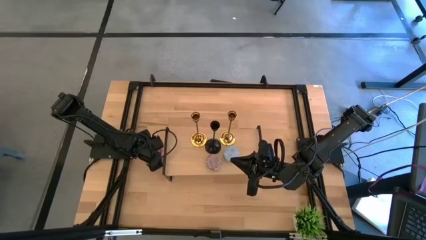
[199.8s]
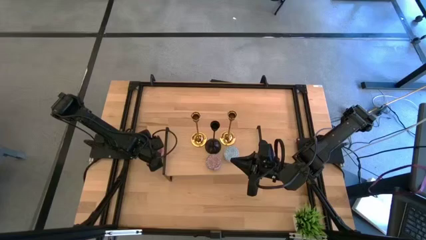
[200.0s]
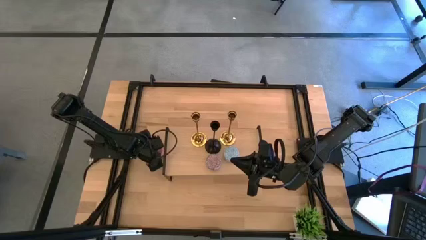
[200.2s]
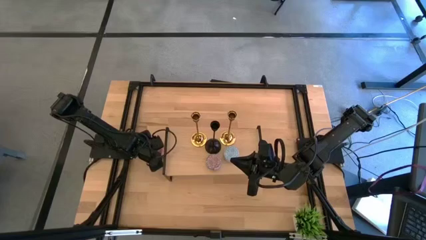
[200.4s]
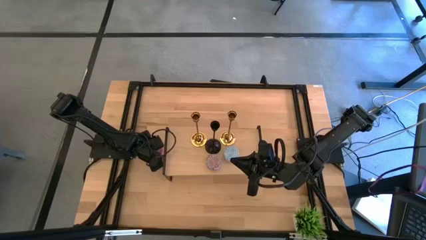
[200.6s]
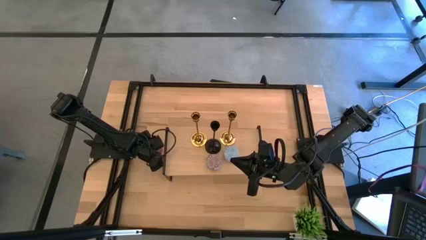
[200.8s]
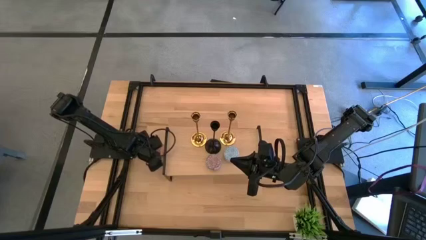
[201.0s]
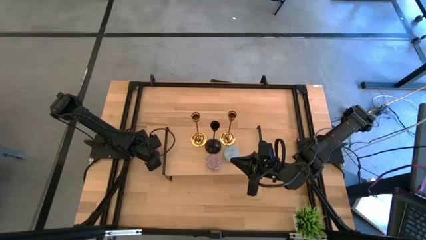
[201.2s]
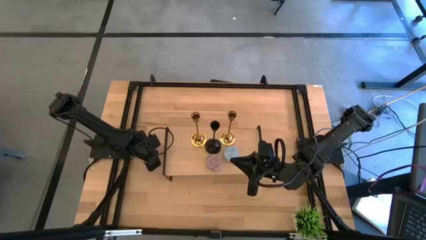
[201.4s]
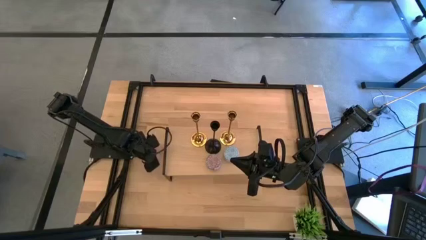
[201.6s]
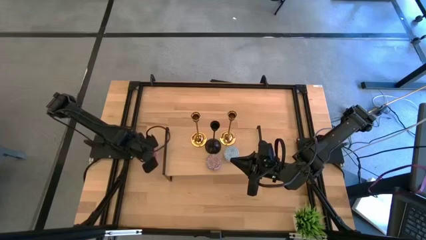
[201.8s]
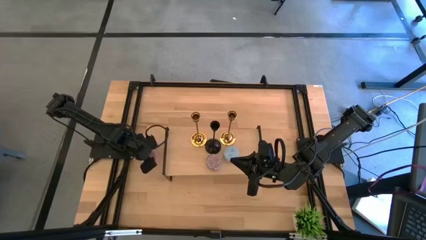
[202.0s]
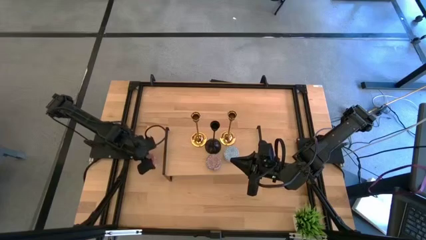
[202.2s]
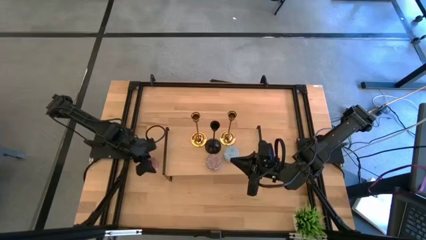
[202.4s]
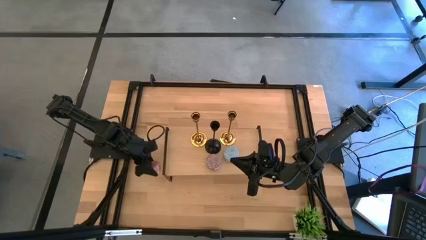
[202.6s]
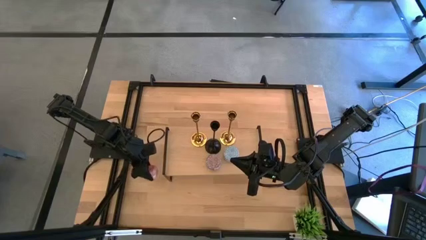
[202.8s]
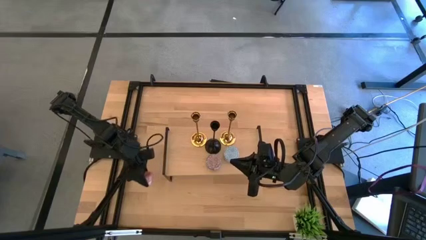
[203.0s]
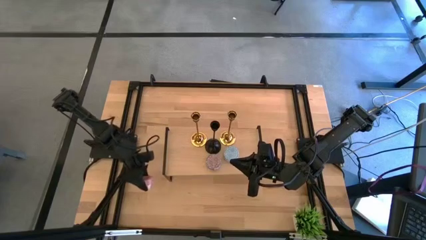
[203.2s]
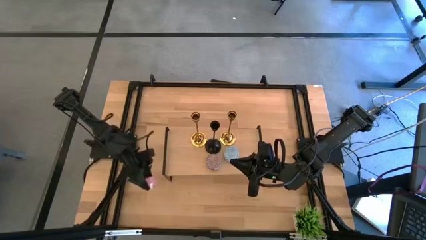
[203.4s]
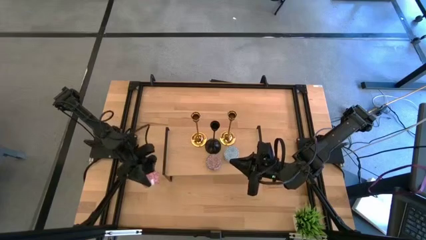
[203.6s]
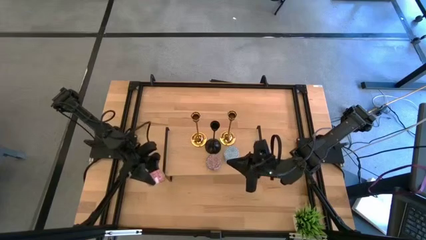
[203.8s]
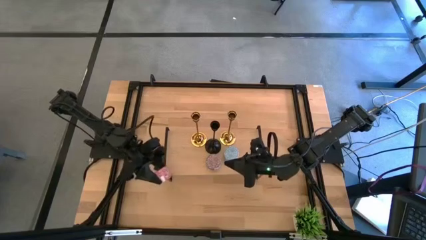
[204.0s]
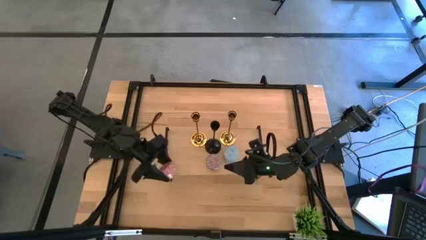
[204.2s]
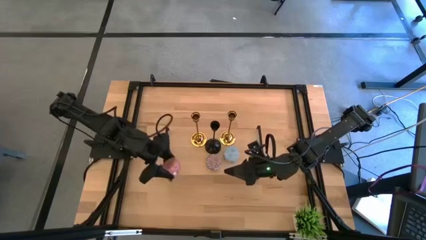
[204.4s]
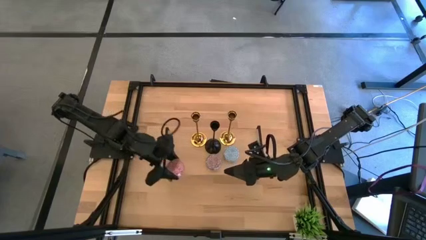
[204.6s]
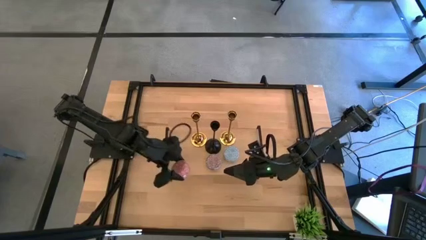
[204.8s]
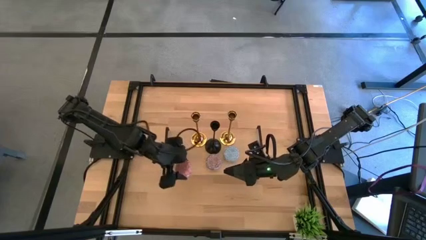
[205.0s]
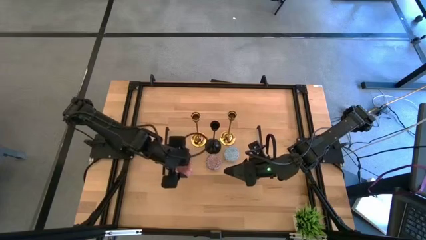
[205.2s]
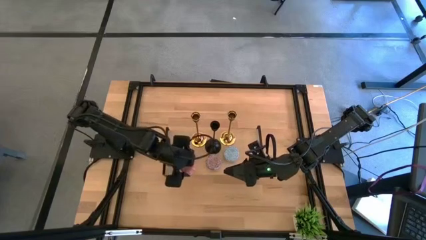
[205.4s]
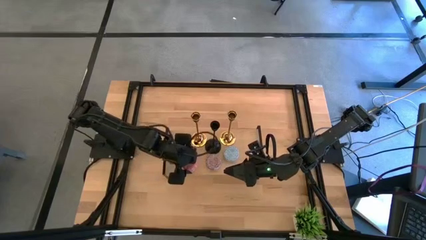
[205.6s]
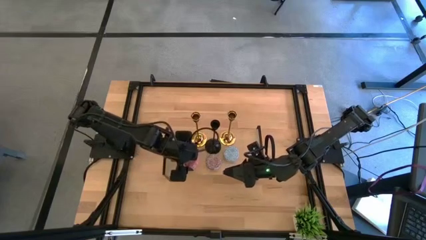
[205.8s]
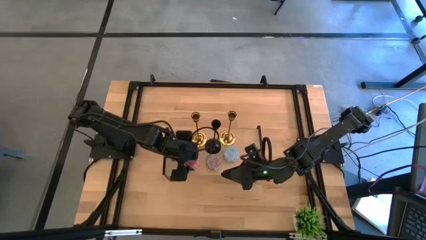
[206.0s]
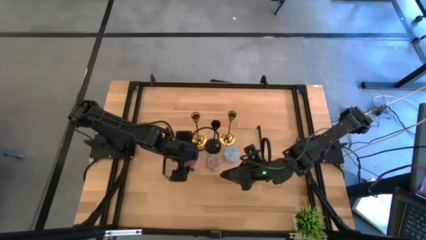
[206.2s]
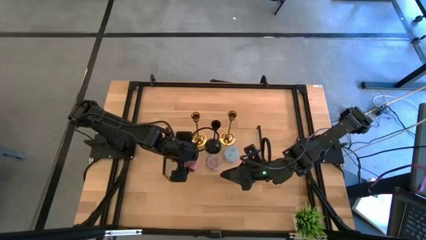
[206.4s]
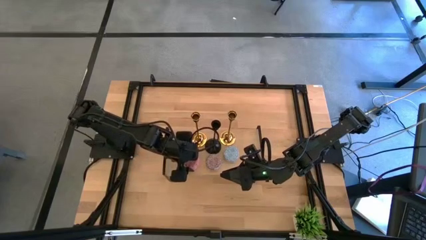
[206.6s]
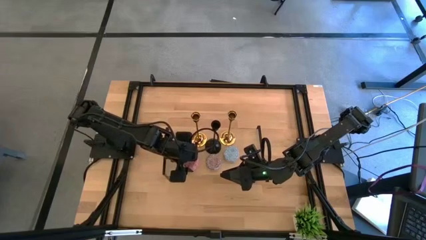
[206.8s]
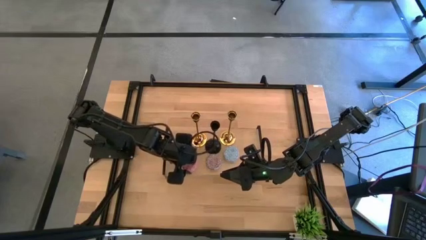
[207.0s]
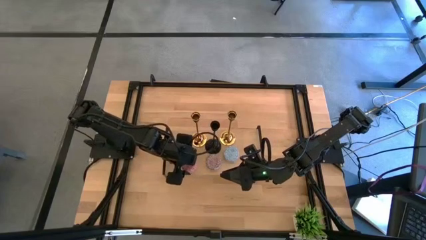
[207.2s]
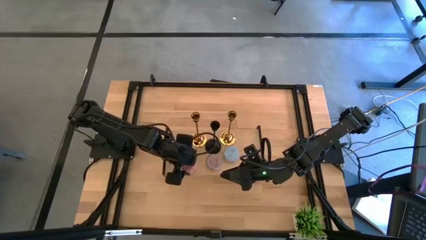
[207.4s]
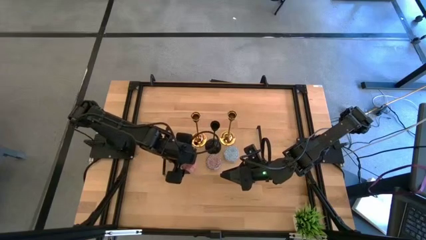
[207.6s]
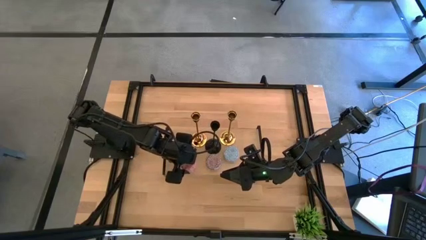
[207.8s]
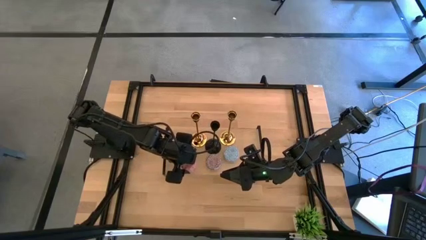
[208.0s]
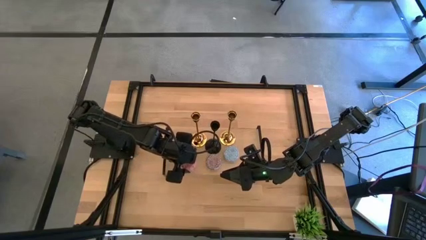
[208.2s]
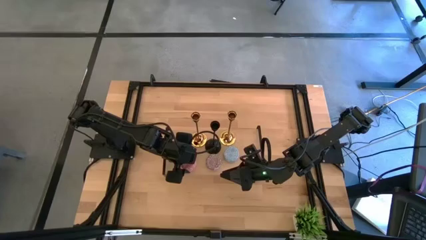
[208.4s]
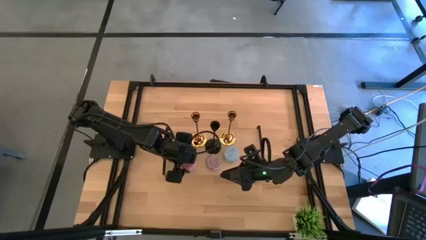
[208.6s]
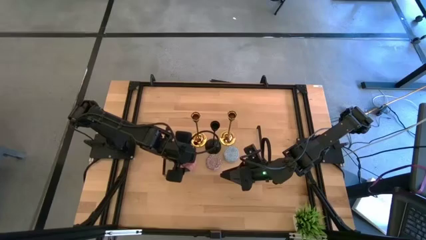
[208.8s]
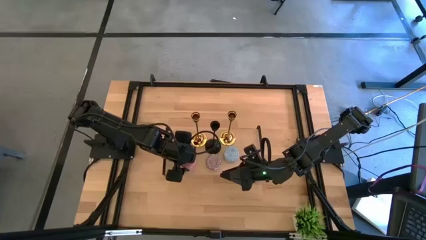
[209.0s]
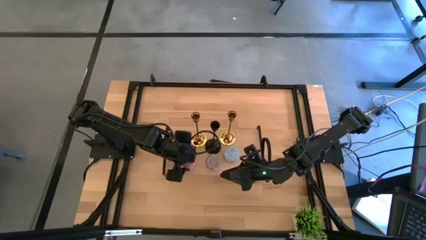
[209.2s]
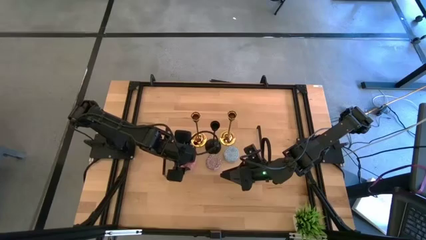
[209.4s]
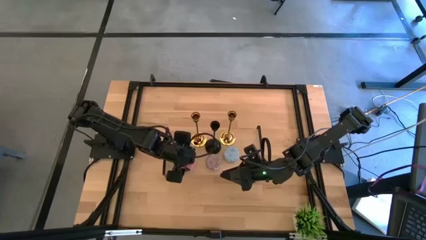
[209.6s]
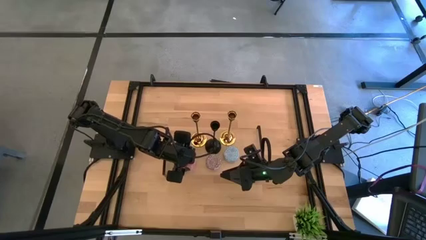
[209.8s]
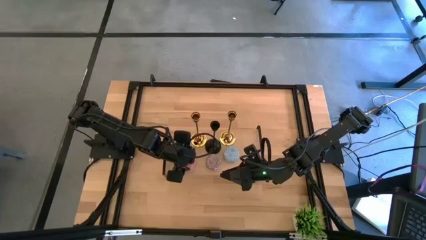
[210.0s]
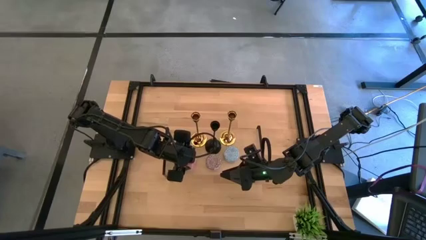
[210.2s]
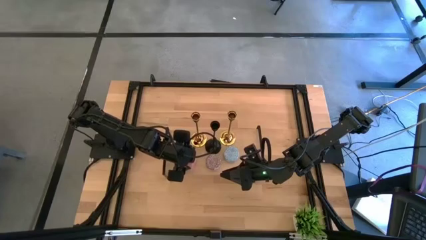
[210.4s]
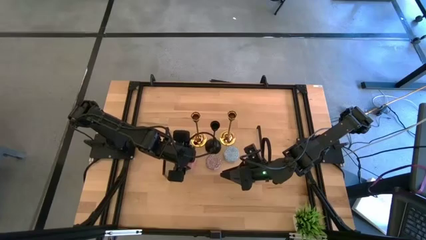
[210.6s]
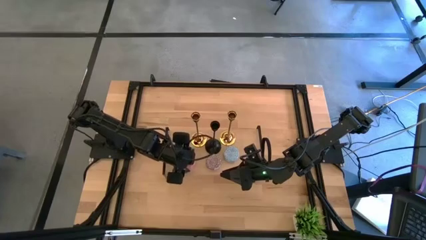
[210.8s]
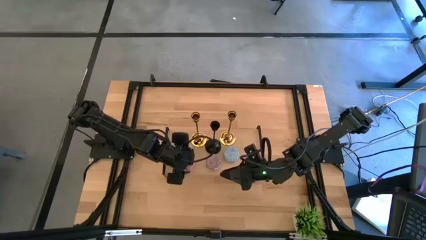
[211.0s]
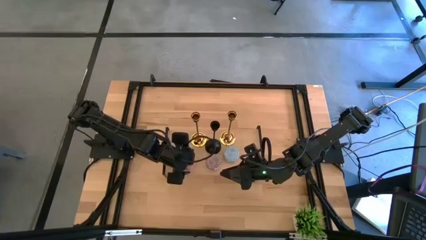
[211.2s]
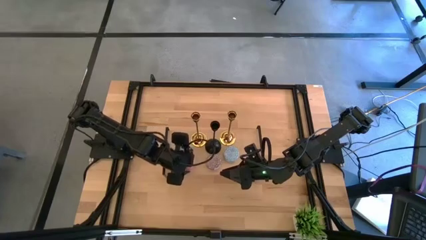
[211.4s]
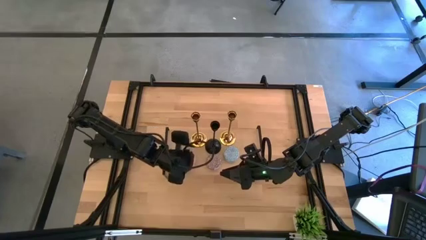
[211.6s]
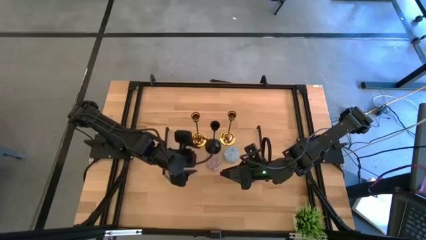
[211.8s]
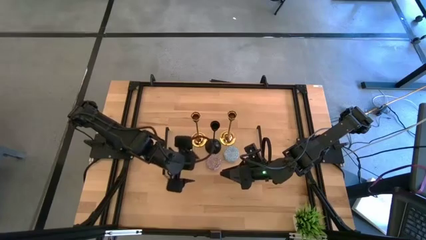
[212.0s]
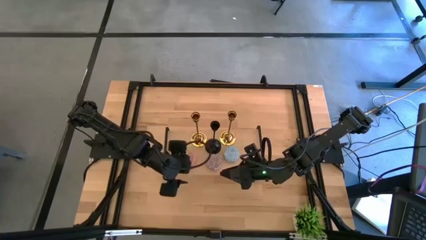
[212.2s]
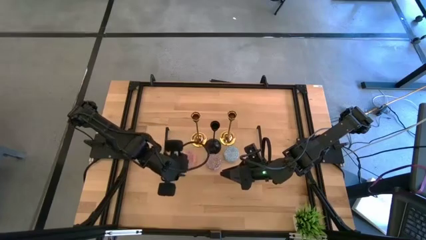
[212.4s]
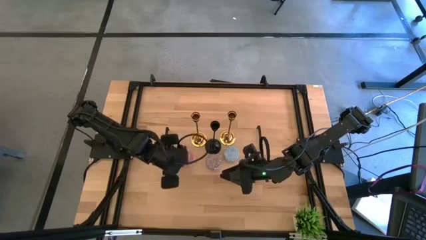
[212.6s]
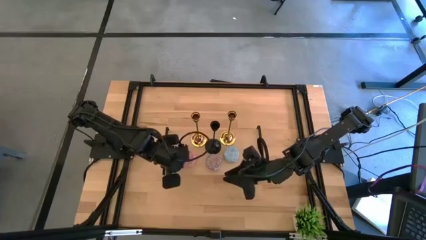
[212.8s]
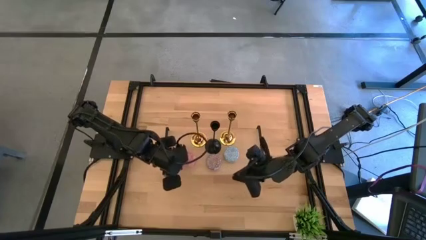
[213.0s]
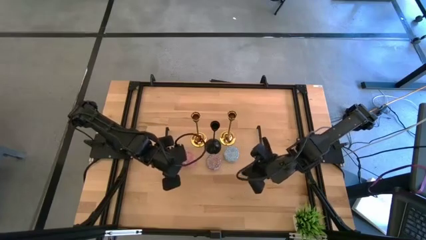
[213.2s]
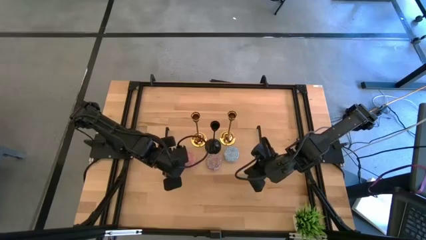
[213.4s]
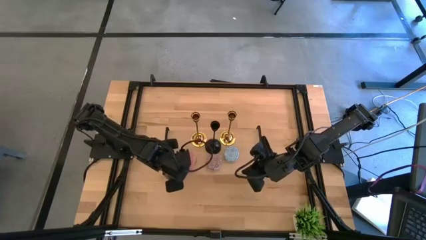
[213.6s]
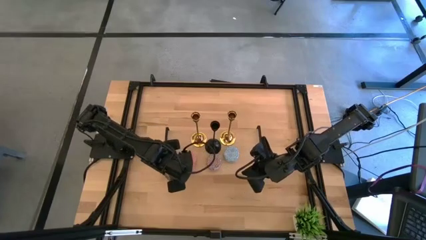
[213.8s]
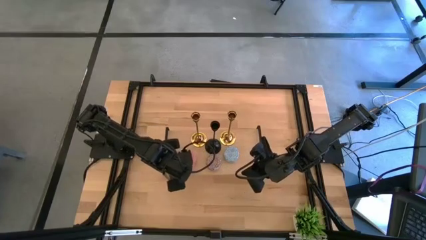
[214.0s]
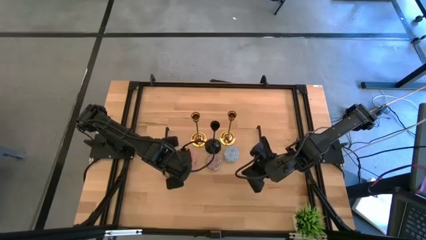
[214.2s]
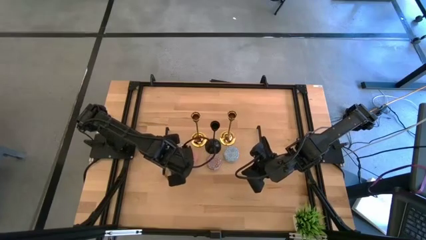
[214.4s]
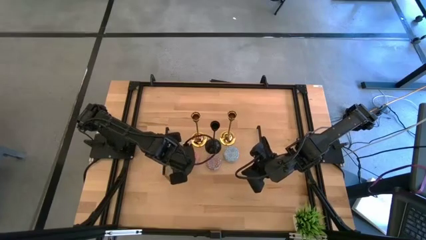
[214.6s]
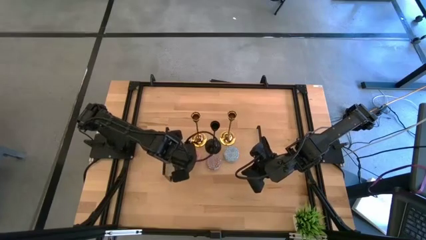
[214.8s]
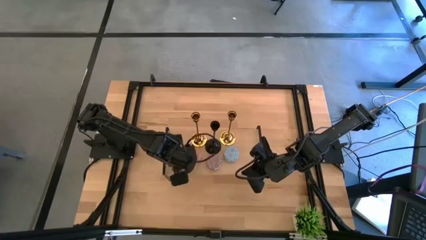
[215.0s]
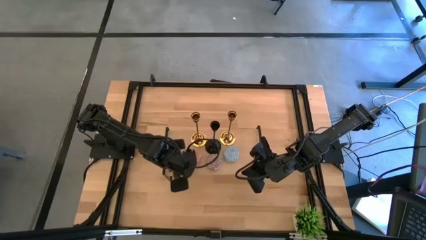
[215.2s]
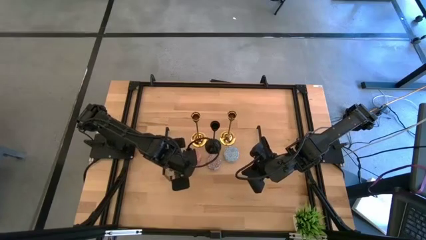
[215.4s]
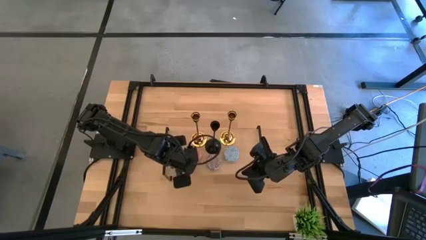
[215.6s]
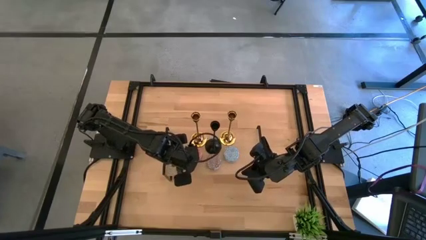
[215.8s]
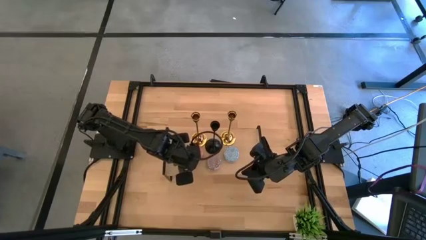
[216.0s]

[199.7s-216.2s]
Task: Pick & Place candle stick holders
Put the pink scented candle on the shelf
